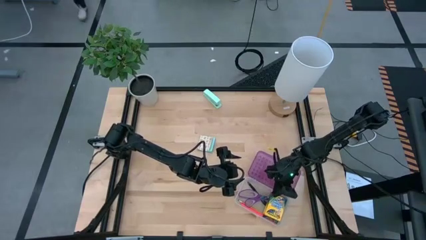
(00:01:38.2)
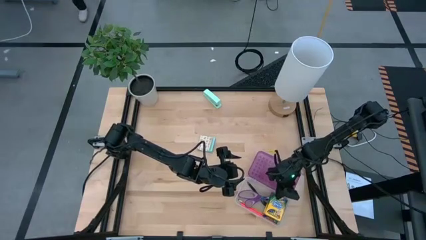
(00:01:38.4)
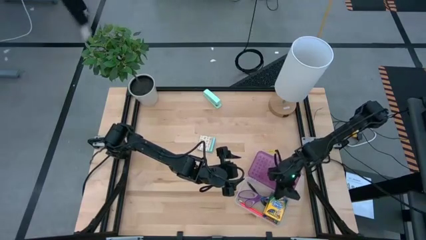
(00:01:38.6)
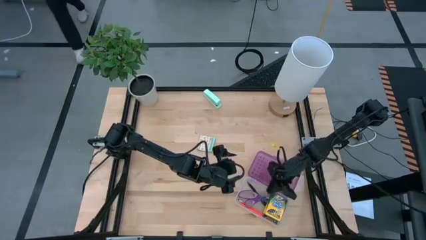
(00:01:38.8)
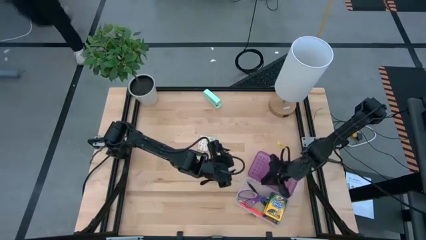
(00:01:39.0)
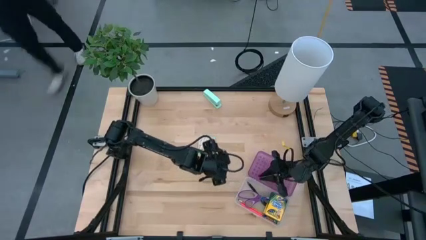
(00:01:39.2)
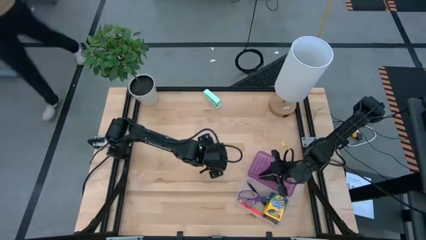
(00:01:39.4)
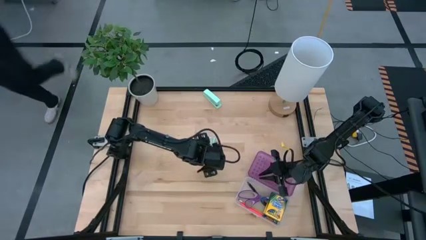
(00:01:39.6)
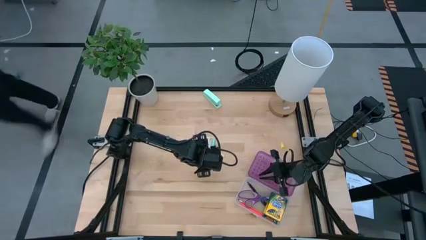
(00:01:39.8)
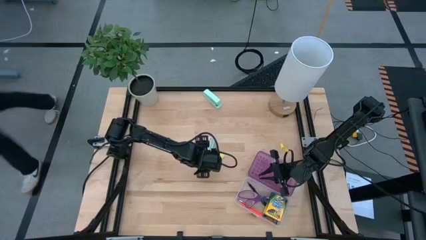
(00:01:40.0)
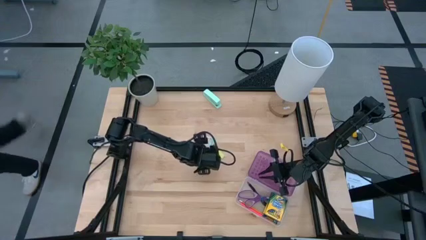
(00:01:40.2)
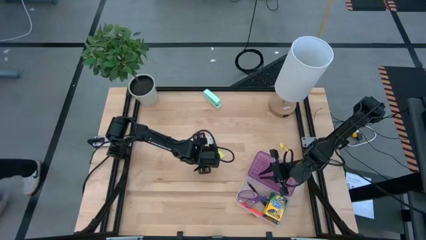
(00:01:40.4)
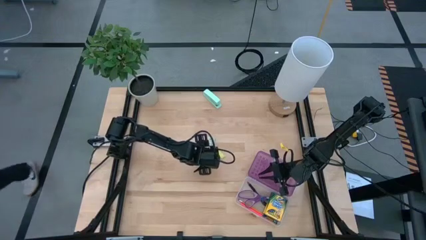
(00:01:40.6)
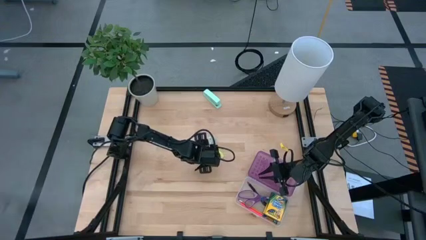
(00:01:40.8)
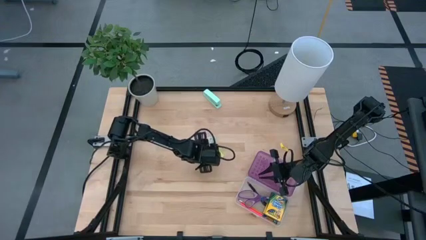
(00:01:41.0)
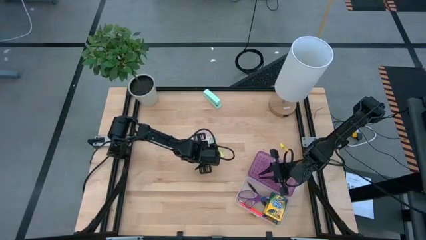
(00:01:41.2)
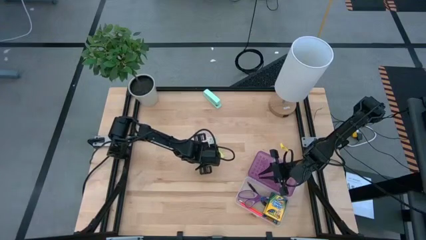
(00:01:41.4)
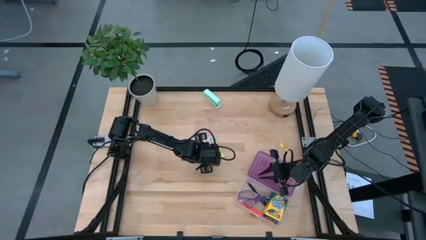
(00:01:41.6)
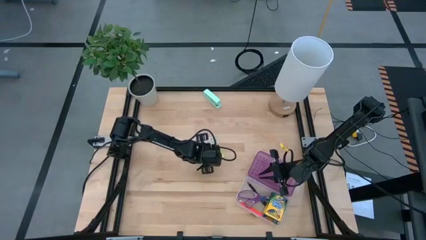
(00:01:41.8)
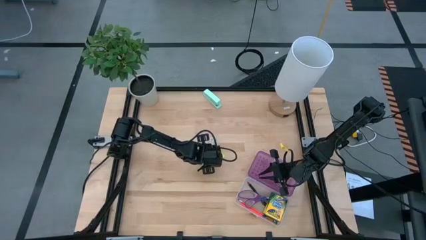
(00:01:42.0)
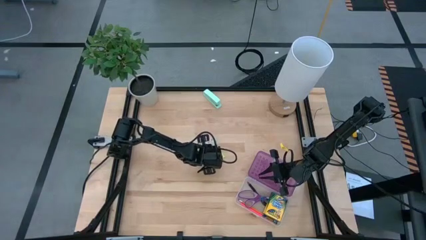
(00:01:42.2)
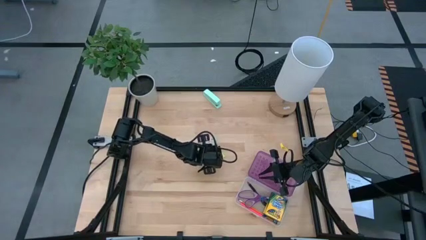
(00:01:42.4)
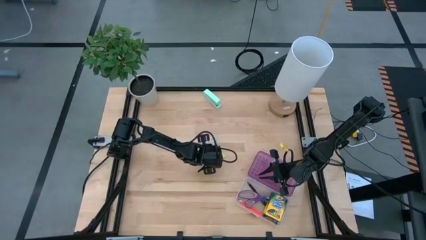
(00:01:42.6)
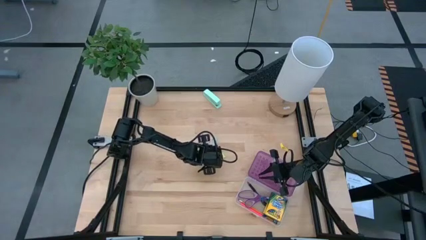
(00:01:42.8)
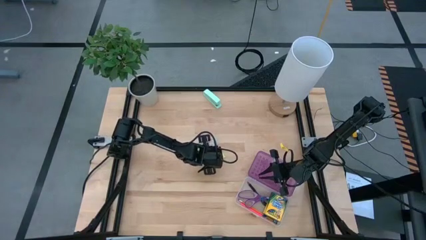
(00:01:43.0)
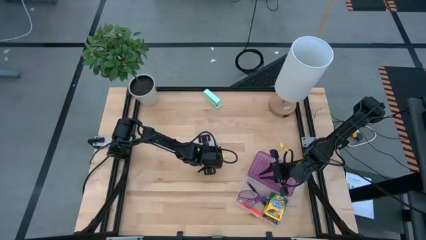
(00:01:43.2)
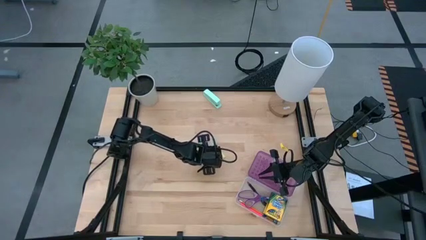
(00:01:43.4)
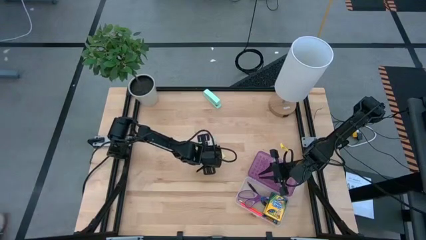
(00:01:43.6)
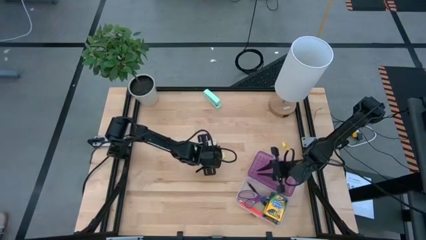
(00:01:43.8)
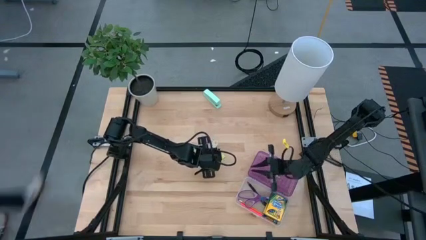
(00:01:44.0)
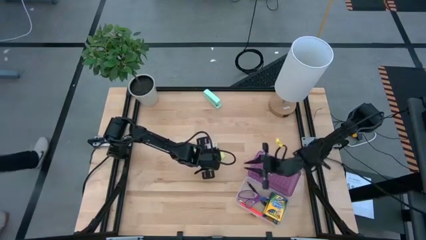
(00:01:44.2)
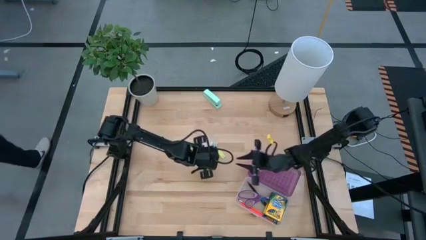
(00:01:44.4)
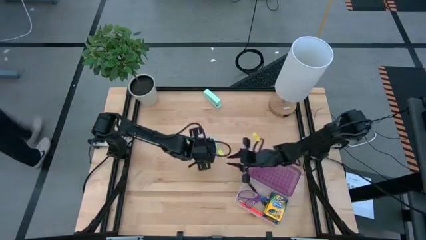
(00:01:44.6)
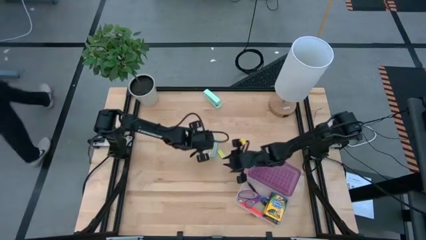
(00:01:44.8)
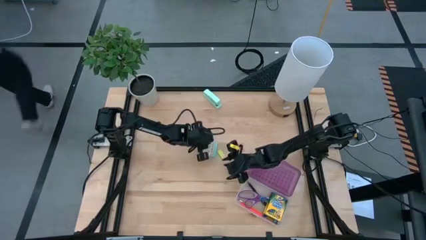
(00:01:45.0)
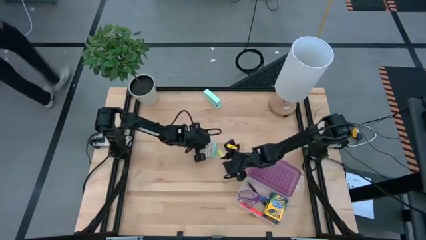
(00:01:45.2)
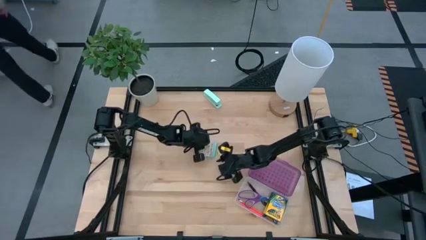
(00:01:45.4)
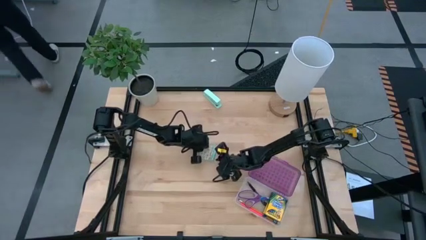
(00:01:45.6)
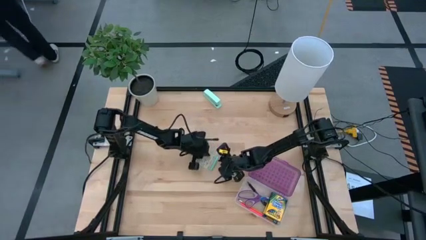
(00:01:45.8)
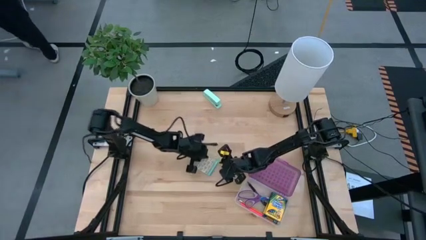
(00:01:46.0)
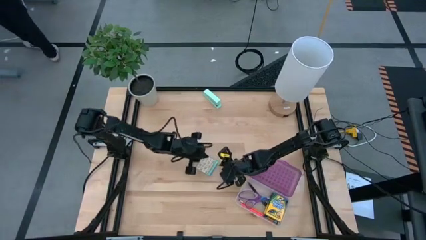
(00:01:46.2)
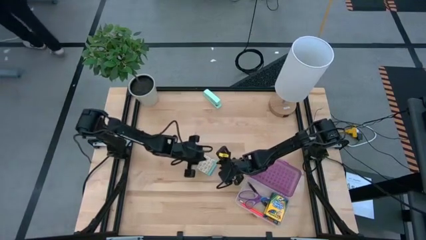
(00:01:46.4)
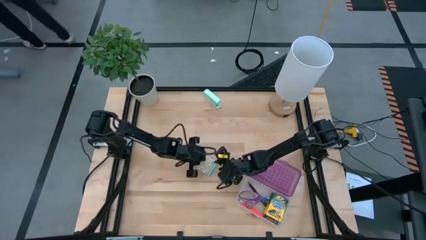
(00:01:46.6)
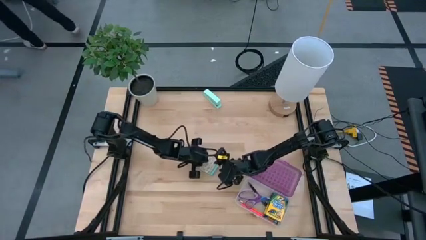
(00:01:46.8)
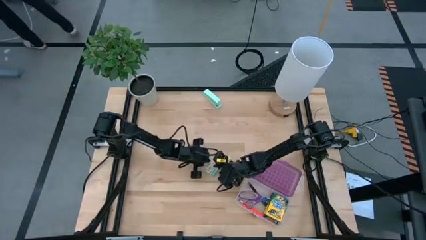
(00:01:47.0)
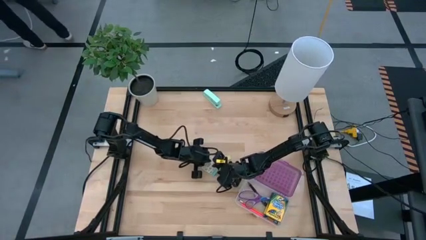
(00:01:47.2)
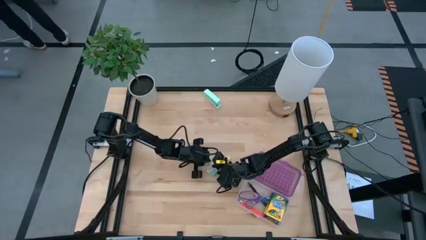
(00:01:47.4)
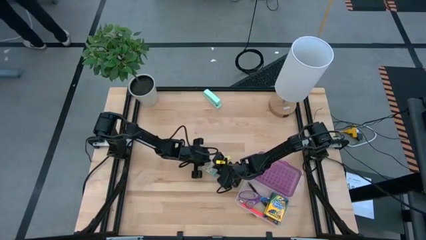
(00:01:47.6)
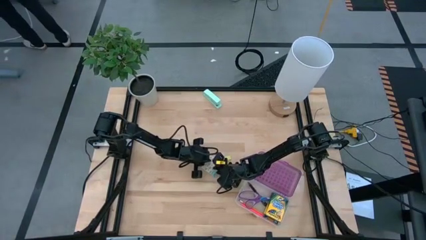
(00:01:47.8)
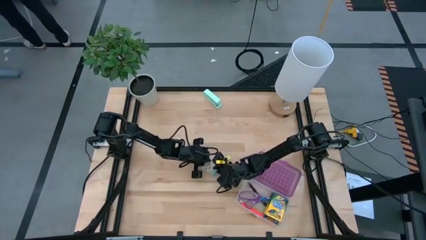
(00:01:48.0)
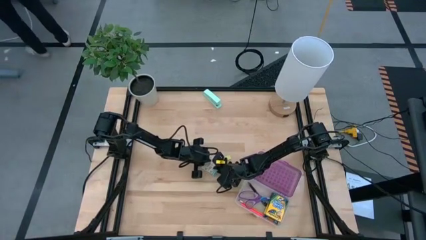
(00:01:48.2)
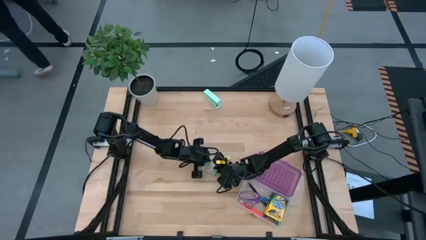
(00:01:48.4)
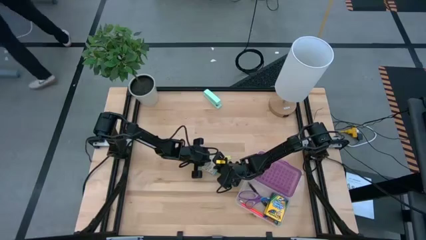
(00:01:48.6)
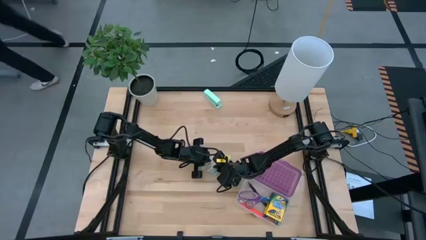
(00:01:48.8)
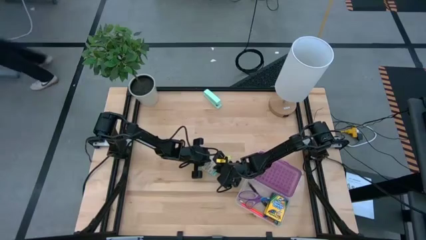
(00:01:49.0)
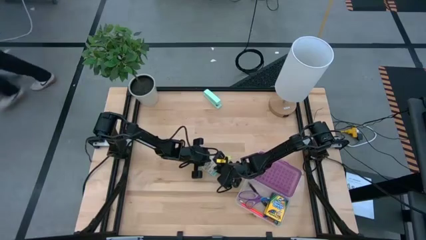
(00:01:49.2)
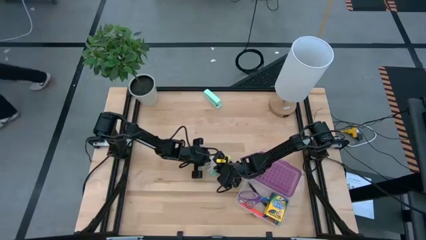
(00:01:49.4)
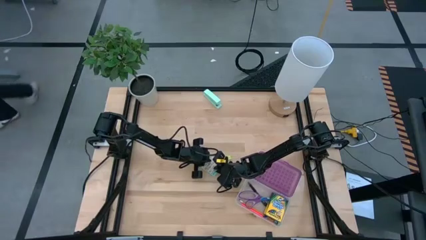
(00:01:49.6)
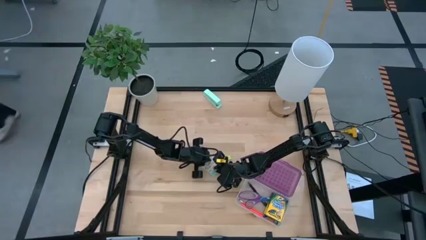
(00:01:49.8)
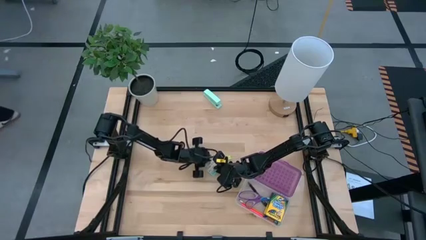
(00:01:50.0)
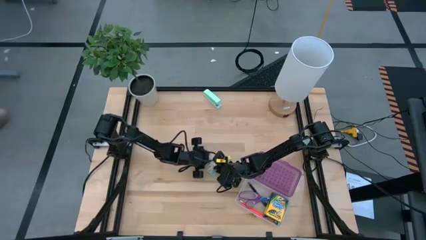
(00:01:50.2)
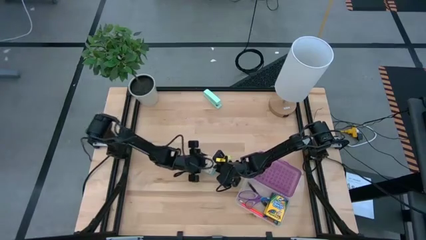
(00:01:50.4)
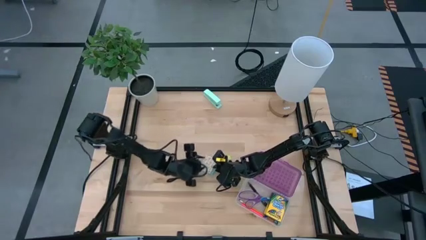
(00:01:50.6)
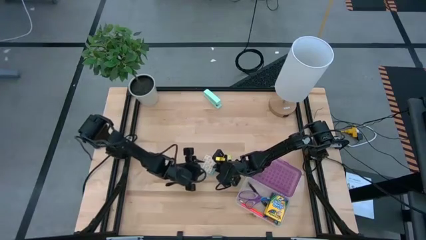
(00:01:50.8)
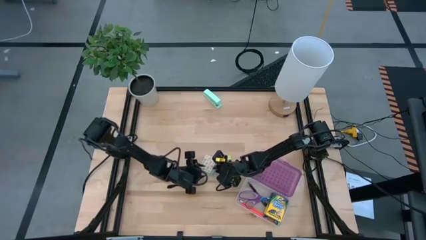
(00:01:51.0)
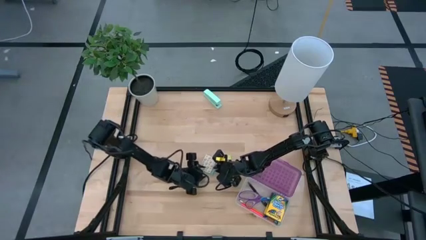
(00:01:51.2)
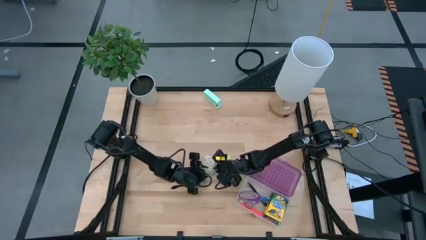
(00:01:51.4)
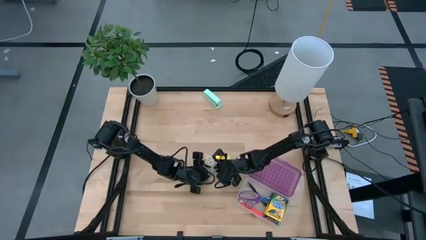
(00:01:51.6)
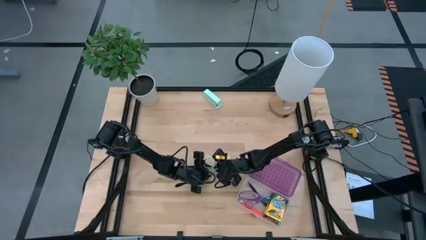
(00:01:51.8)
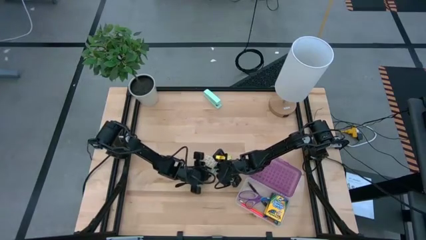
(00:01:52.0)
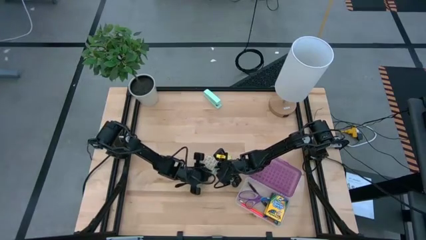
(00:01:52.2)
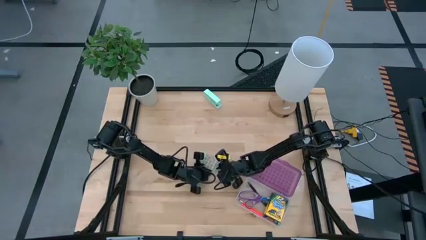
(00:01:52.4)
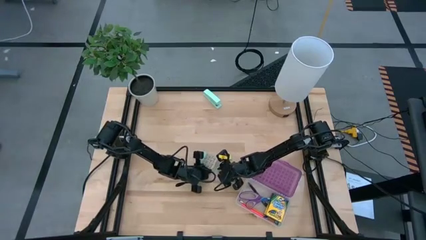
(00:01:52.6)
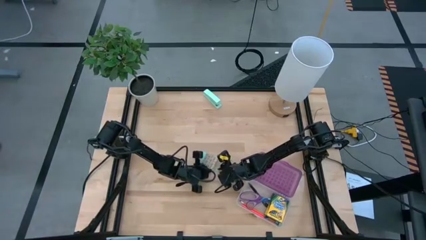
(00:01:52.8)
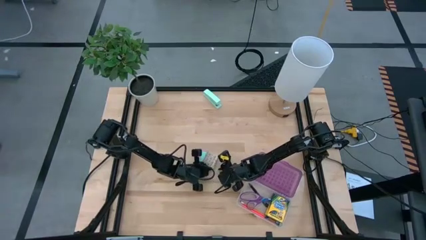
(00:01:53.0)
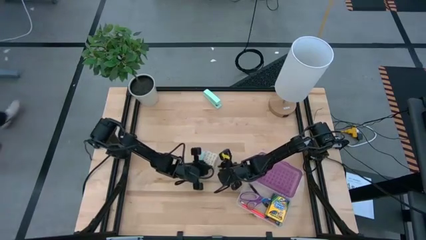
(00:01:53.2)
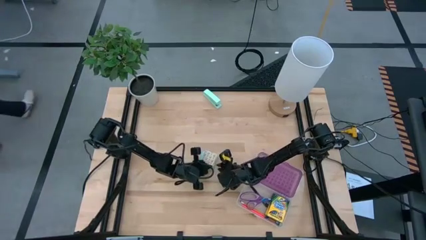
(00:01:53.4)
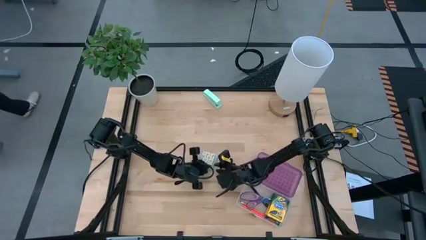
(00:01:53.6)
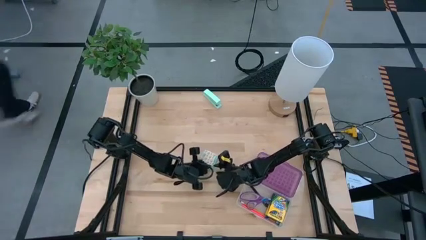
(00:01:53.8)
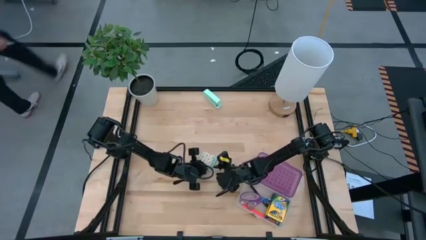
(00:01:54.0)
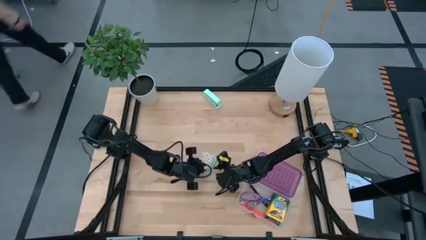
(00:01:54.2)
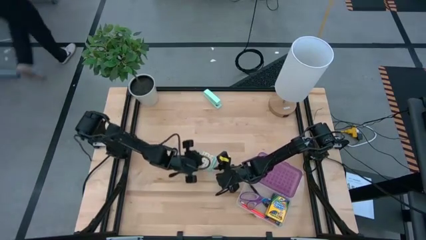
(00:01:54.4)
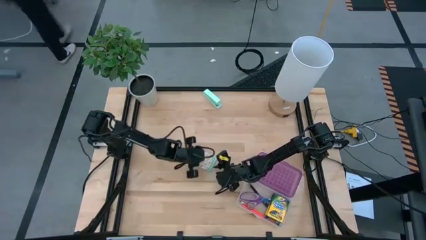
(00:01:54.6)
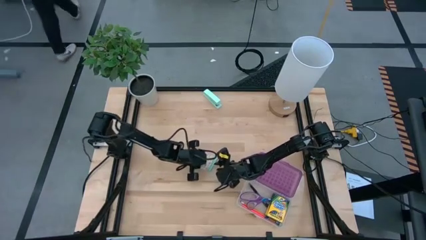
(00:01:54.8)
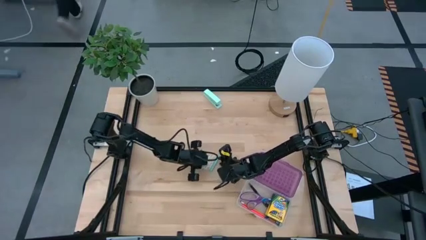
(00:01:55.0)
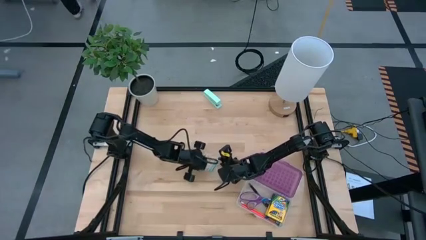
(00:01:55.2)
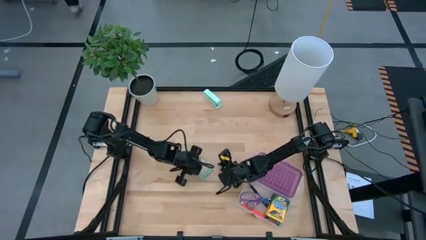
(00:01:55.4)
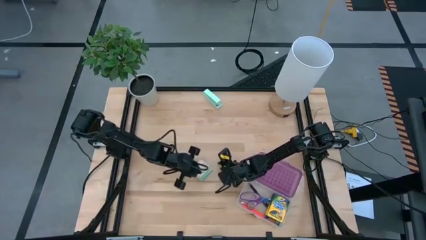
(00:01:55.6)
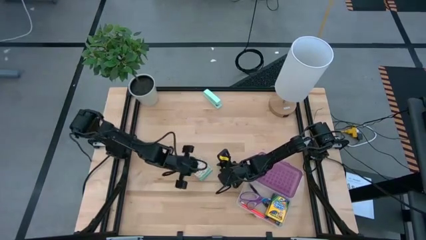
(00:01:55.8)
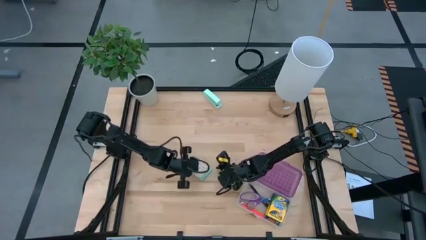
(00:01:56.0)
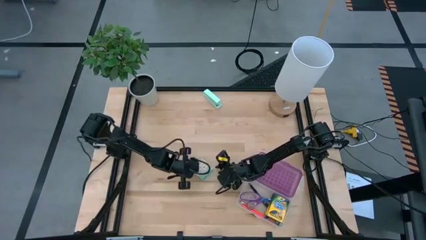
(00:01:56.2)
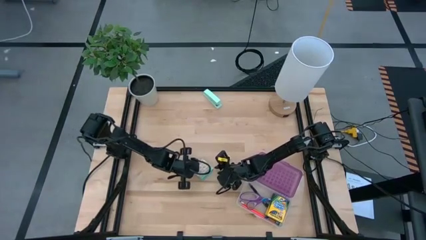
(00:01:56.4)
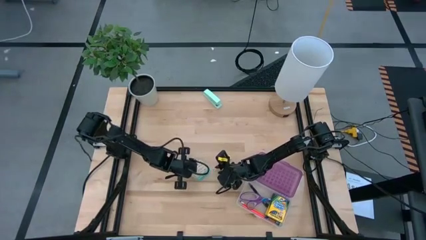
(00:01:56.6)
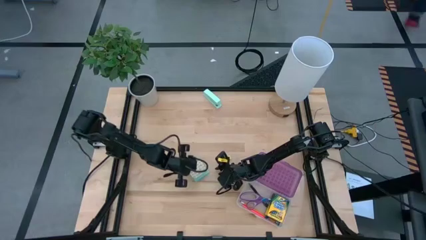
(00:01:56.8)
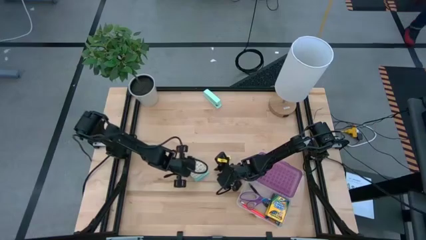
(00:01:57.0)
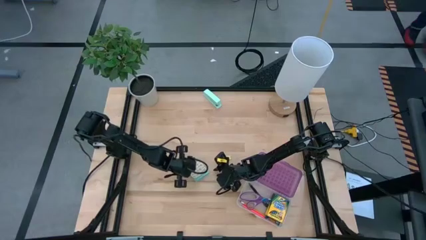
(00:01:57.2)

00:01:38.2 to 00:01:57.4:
Task: Pack school essentials
Put the blue sticky notes into the violet supply box
